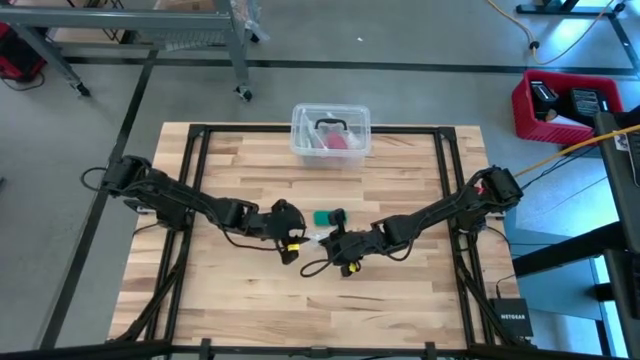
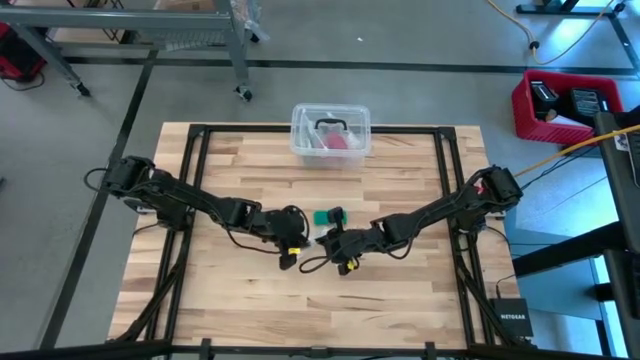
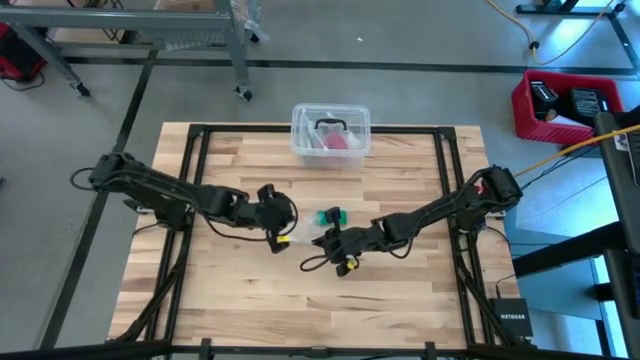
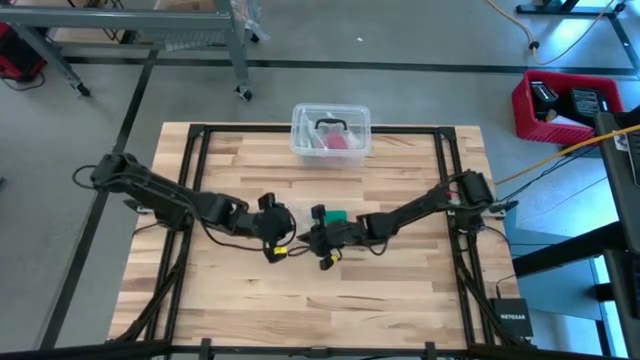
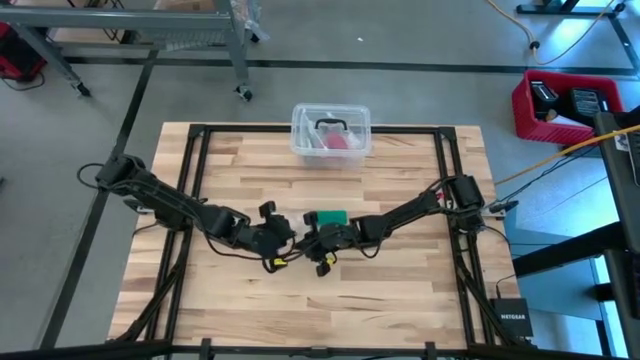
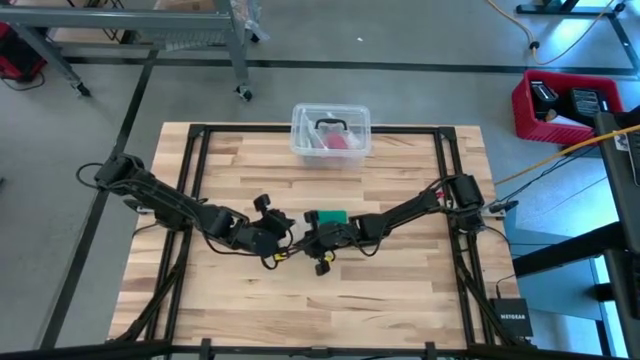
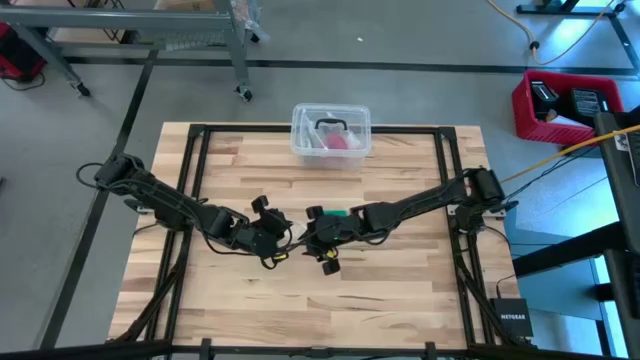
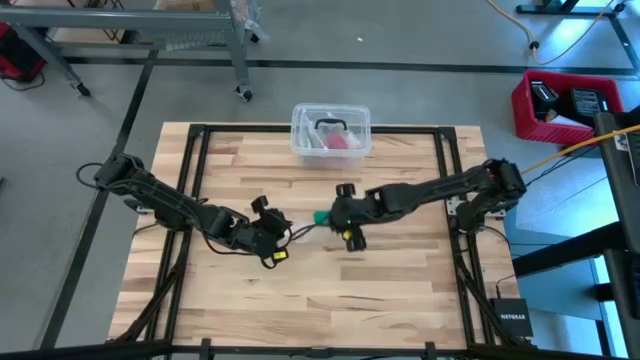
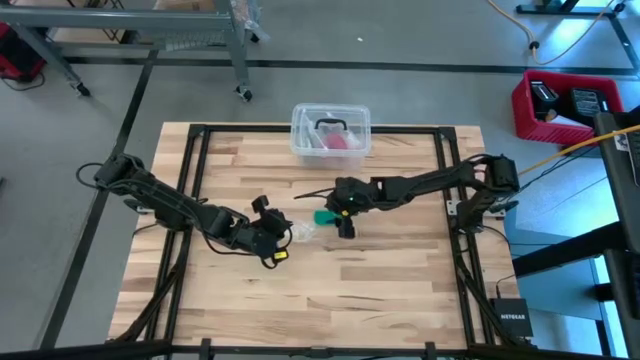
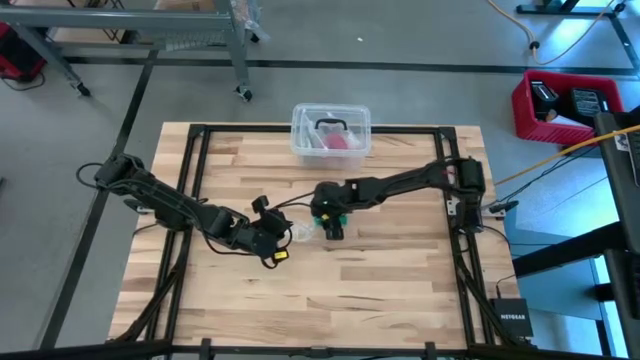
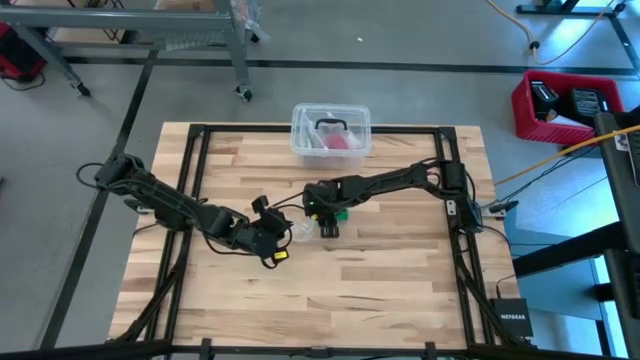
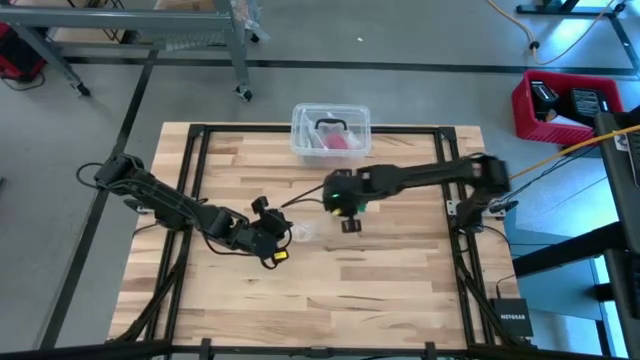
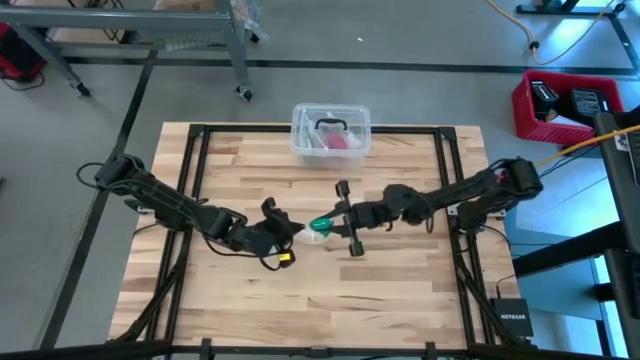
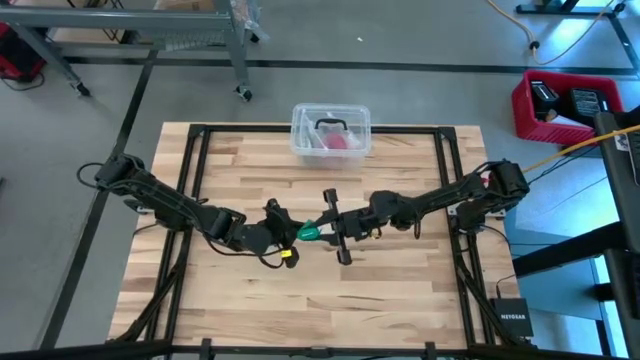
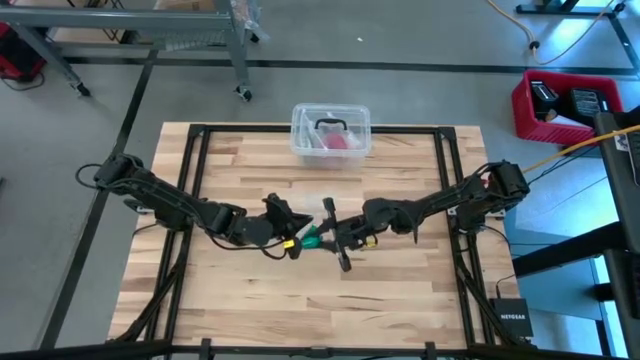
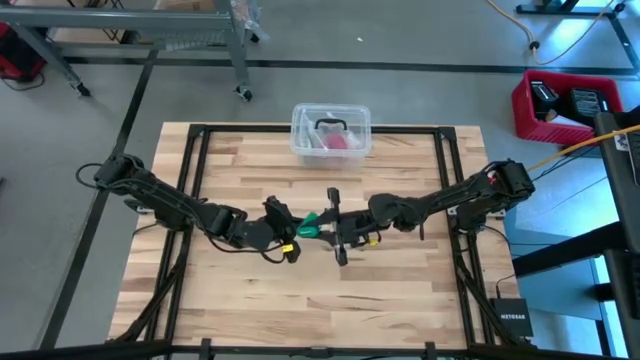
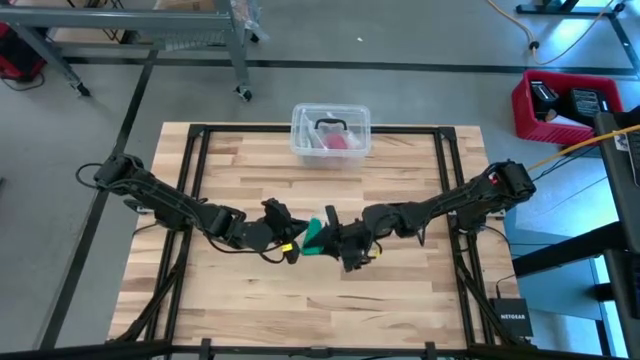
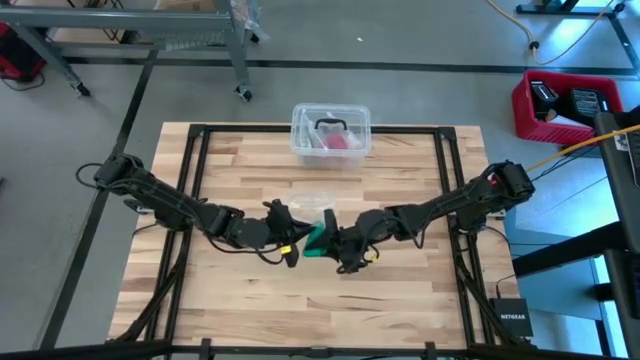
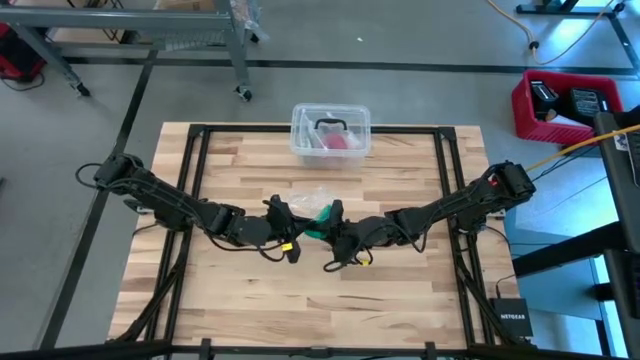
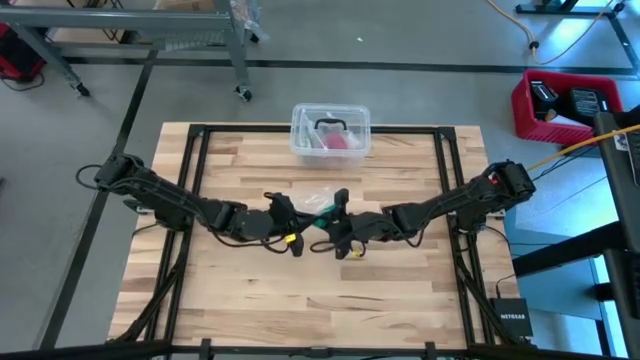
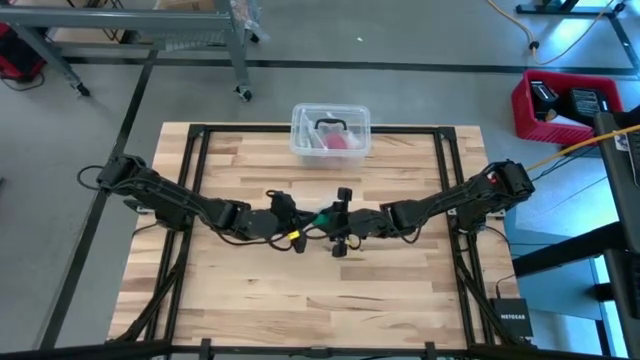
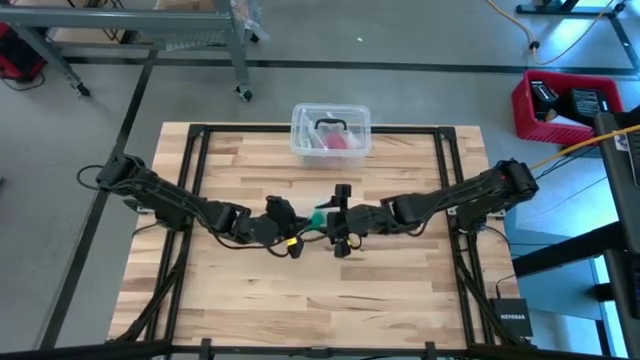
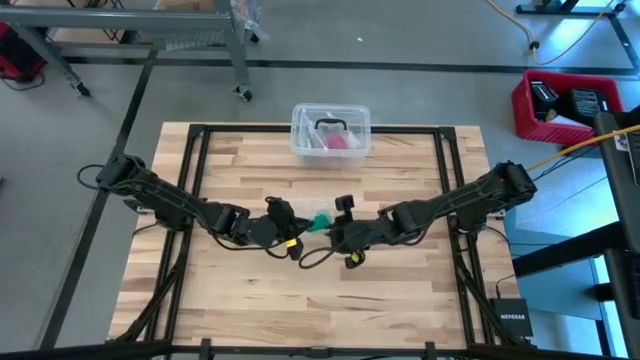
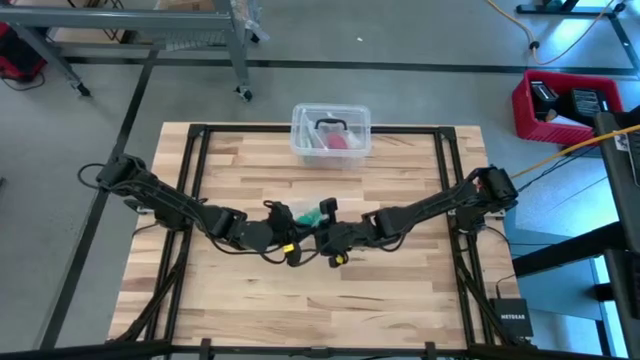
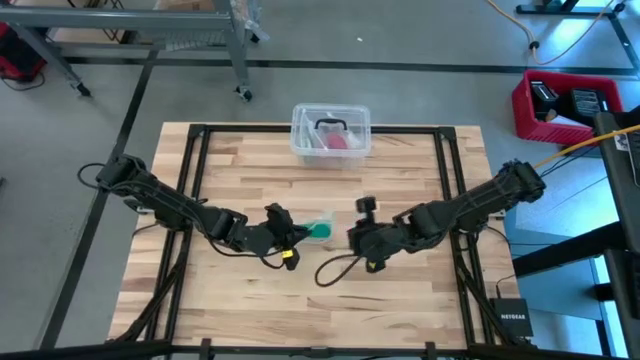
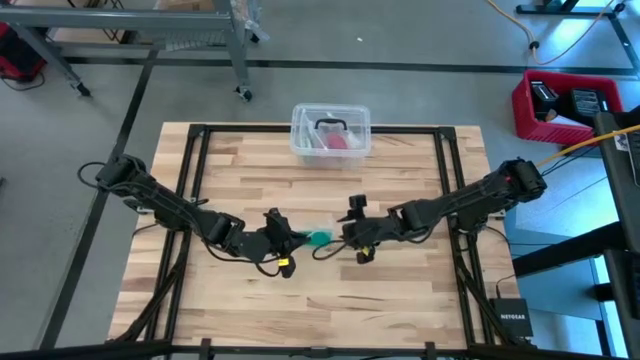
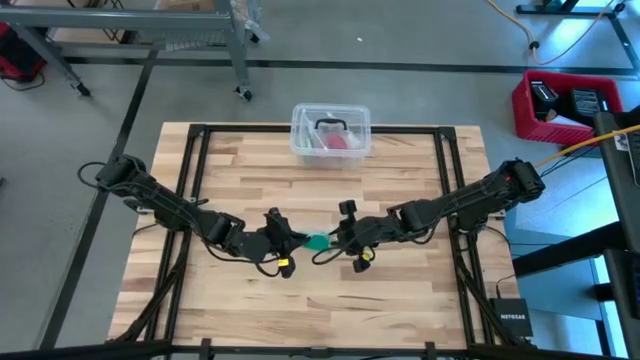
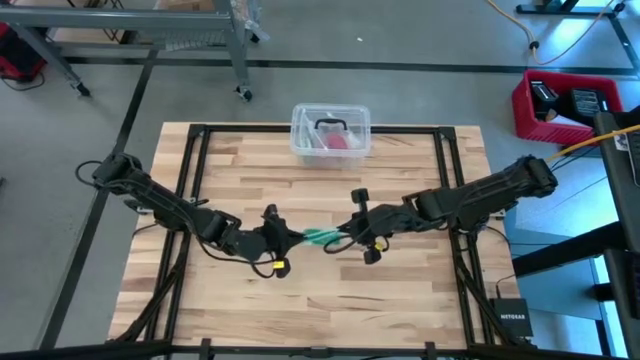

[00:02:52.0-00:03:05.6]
Task: Roll bandage
Put the rolled bandage into the transparent zip bag

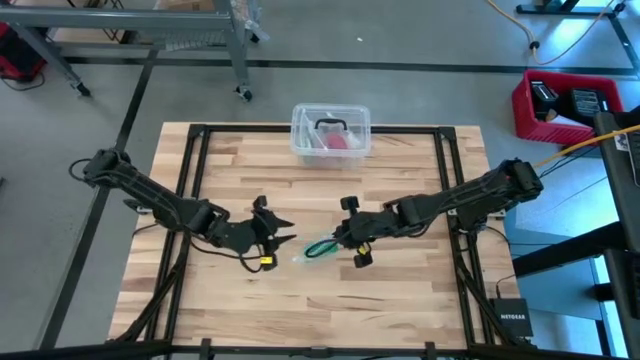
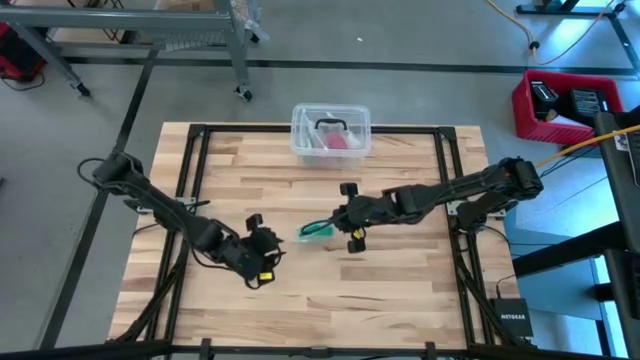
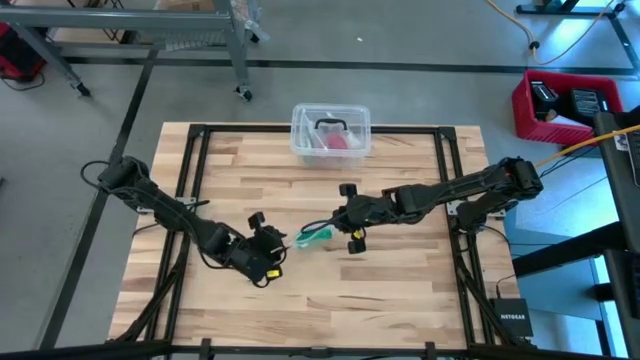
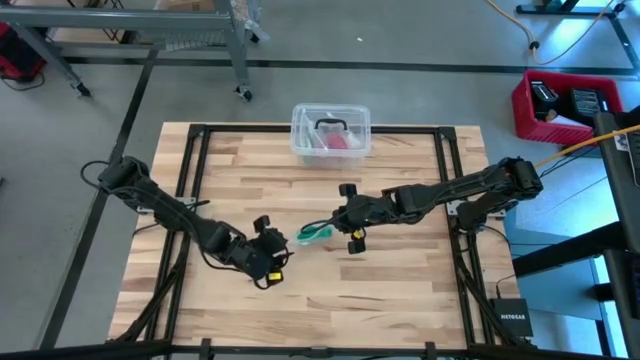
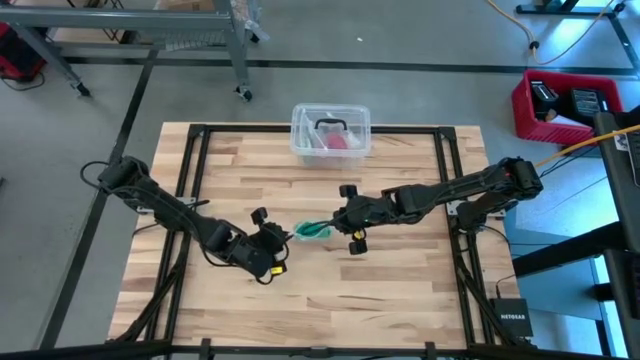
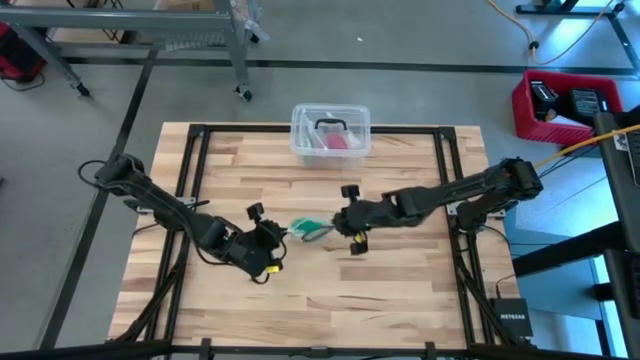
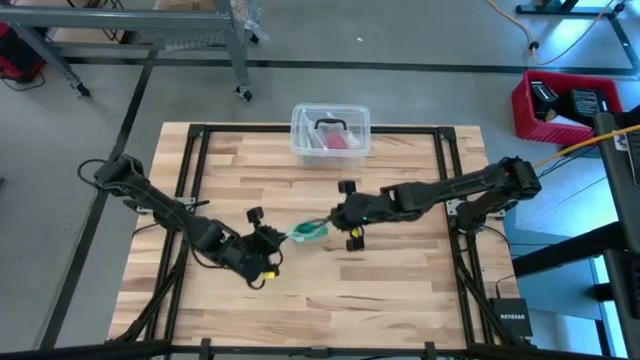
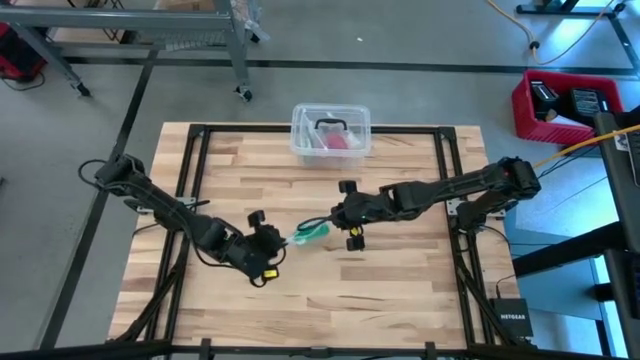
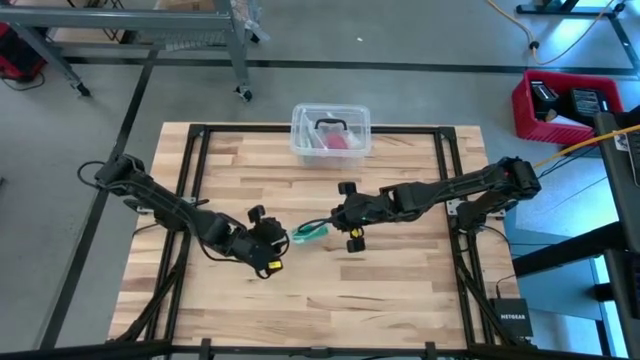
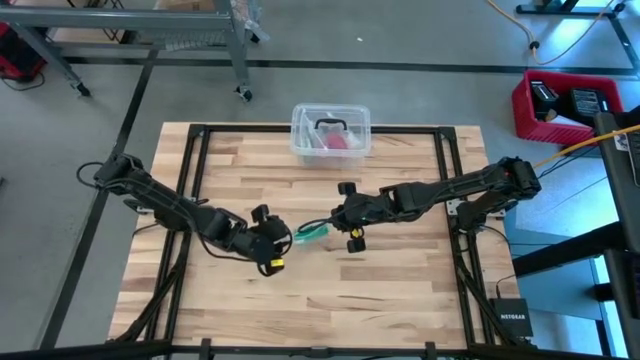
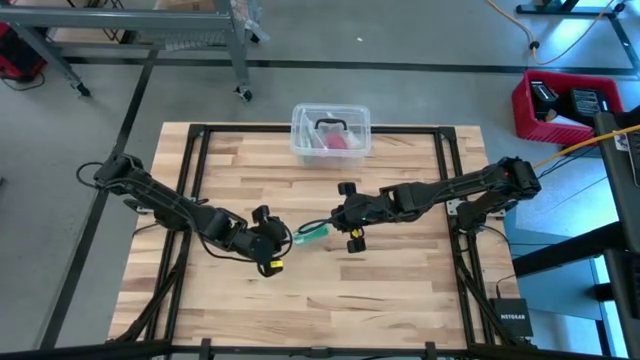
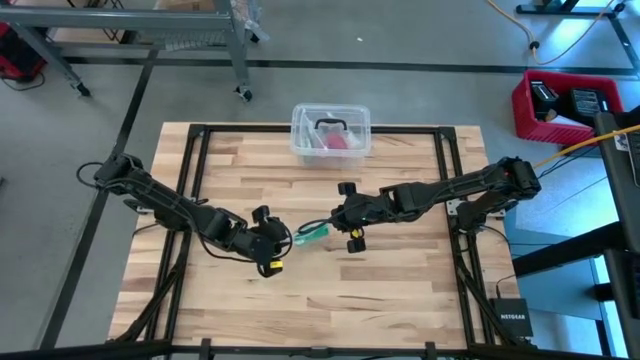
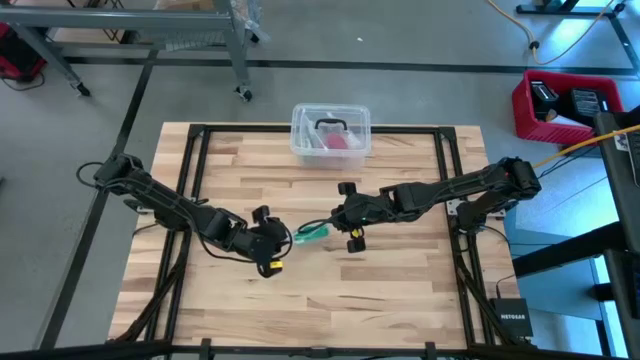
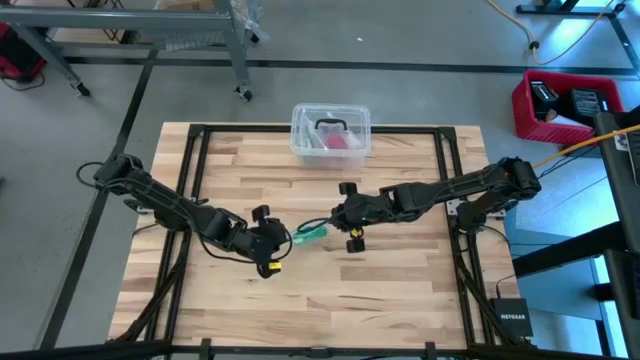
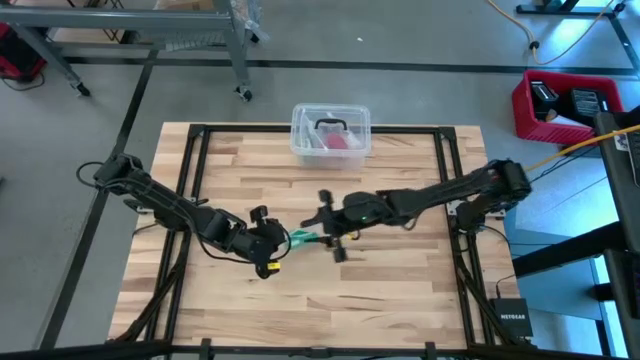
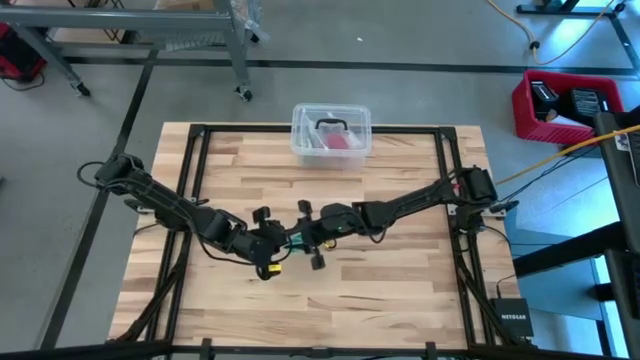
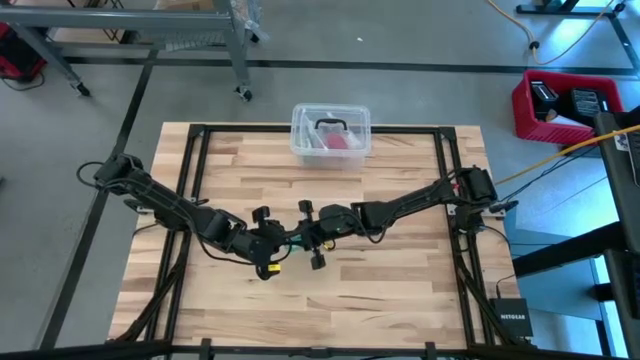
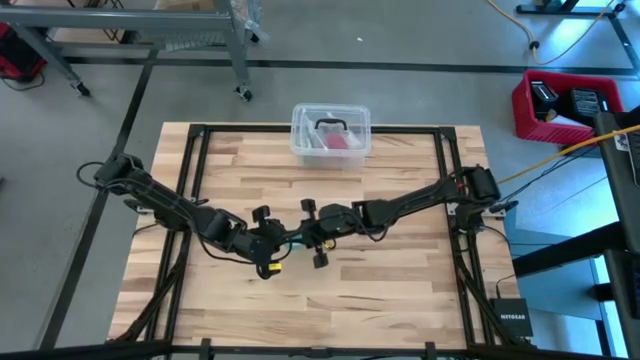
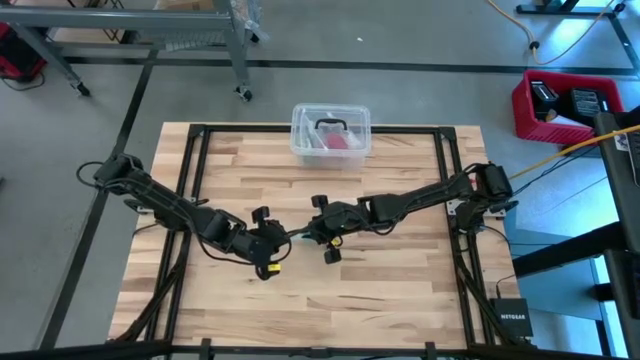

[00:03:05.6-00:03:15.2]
Close the transparent zip bag
